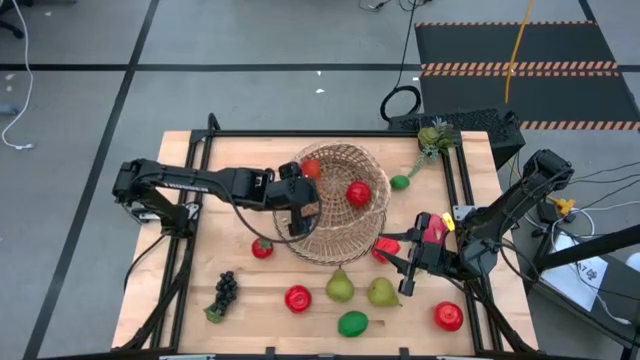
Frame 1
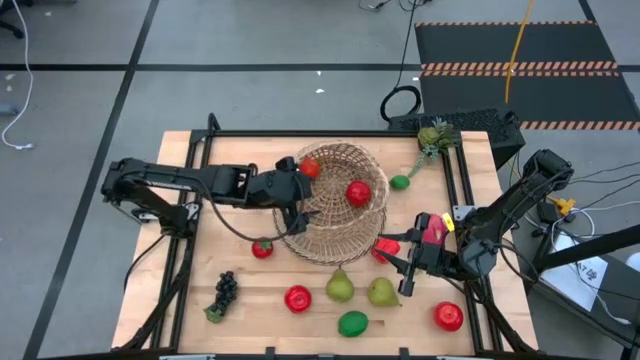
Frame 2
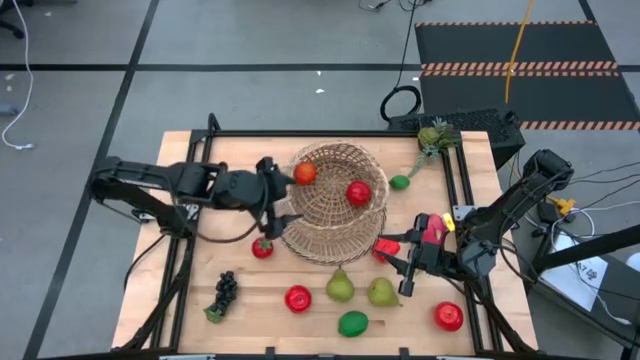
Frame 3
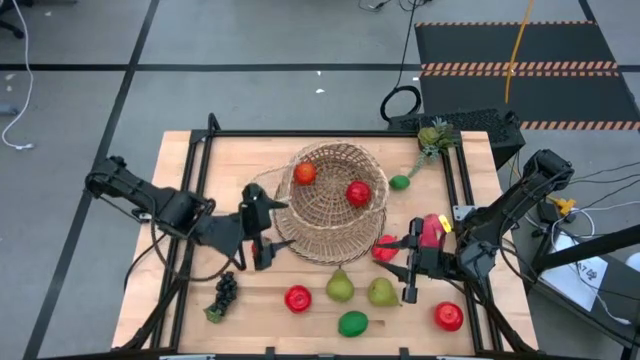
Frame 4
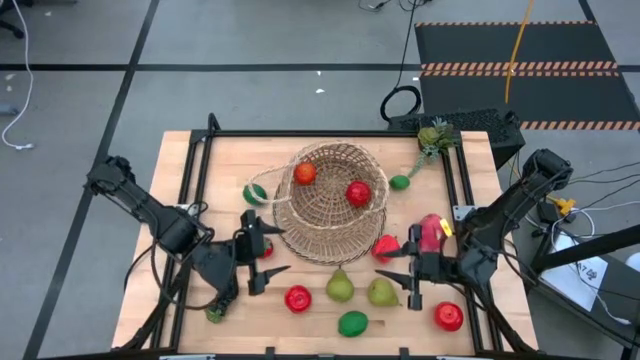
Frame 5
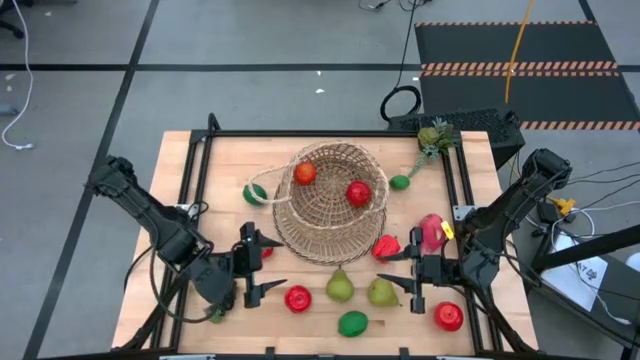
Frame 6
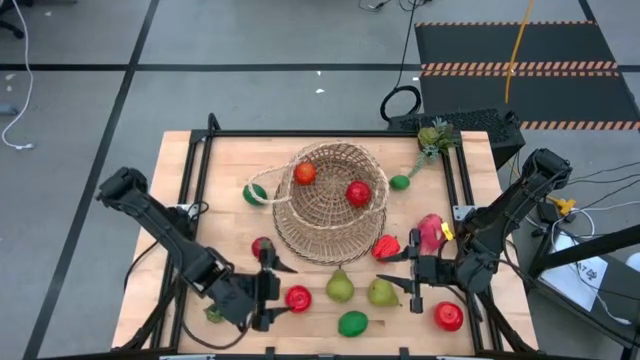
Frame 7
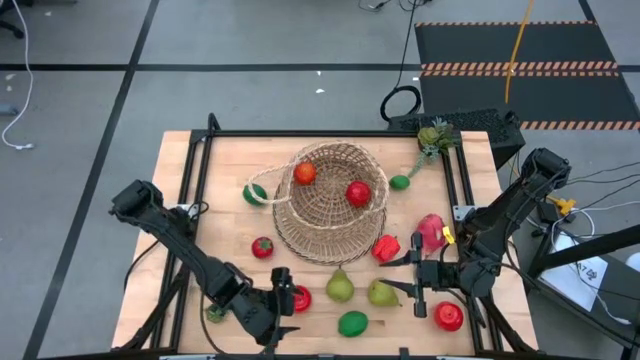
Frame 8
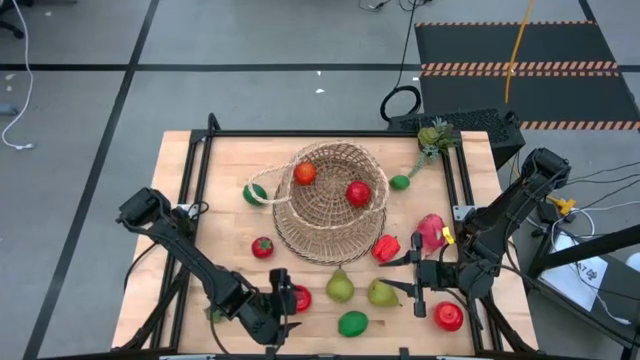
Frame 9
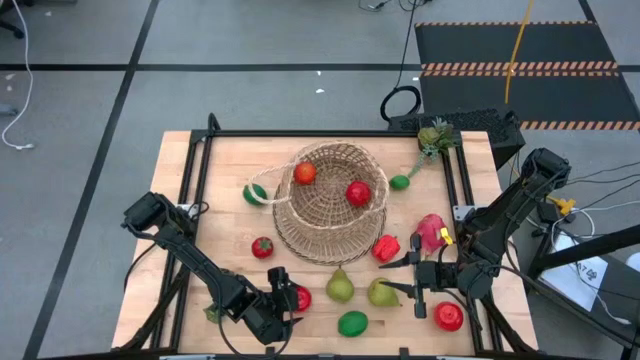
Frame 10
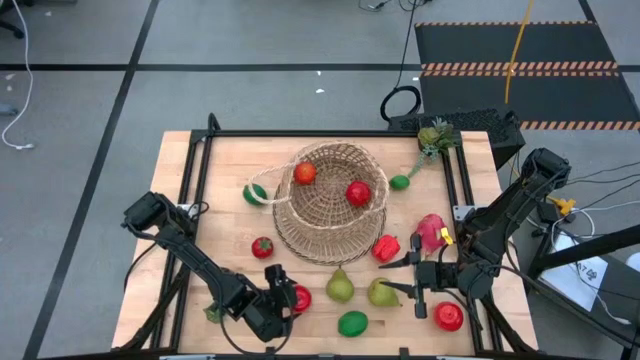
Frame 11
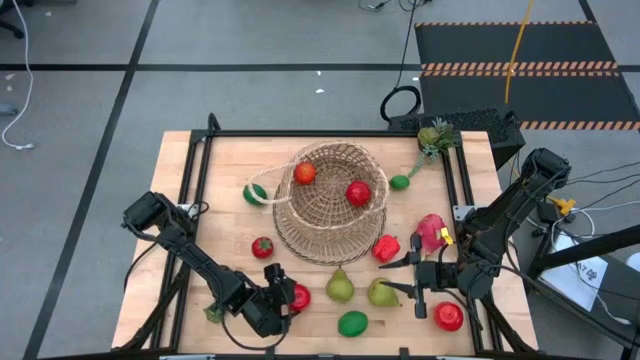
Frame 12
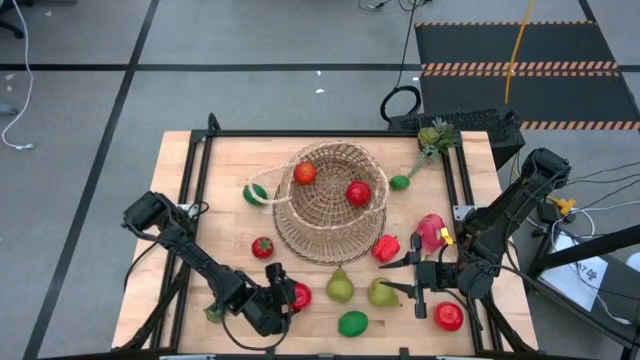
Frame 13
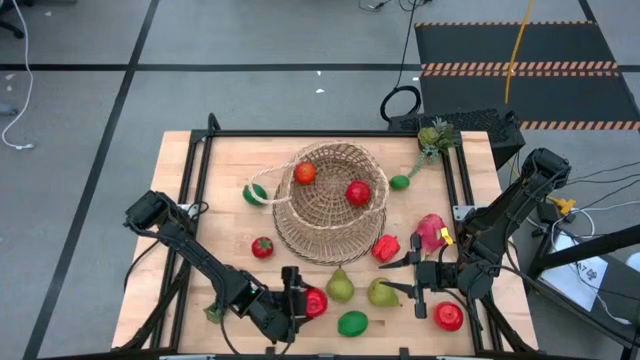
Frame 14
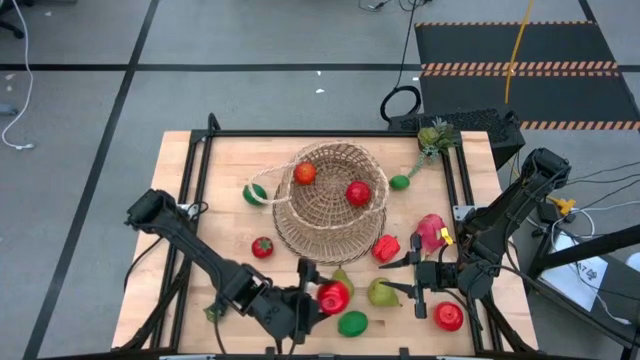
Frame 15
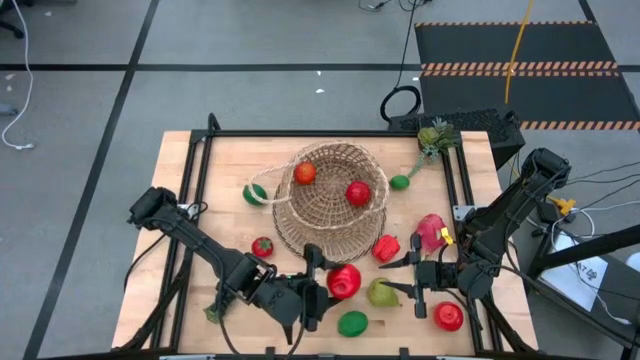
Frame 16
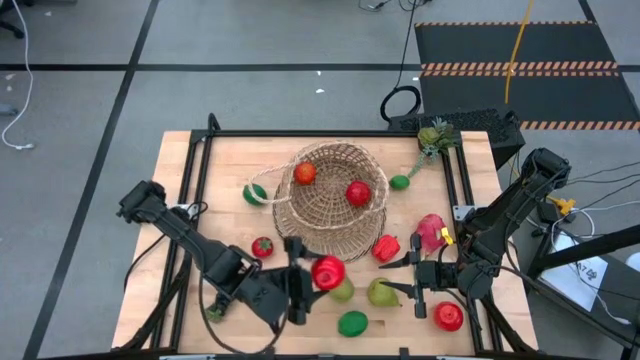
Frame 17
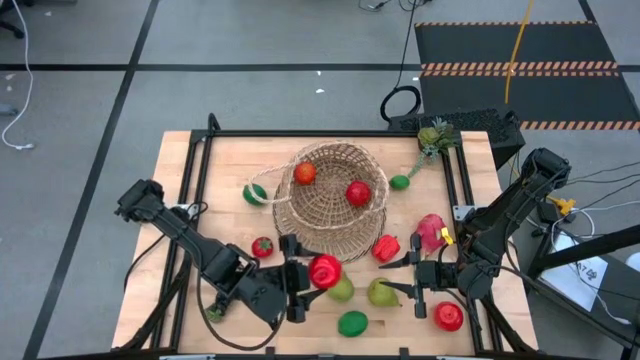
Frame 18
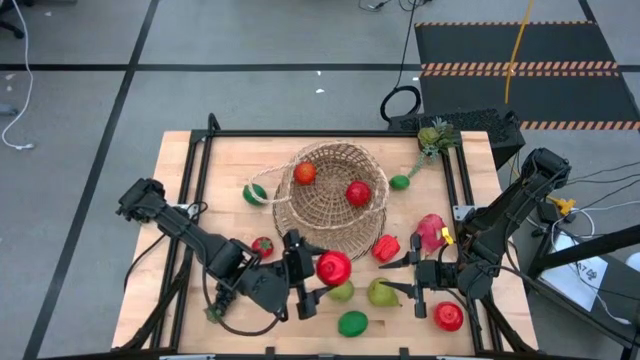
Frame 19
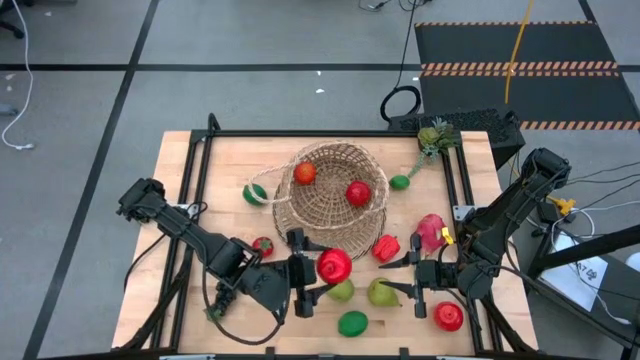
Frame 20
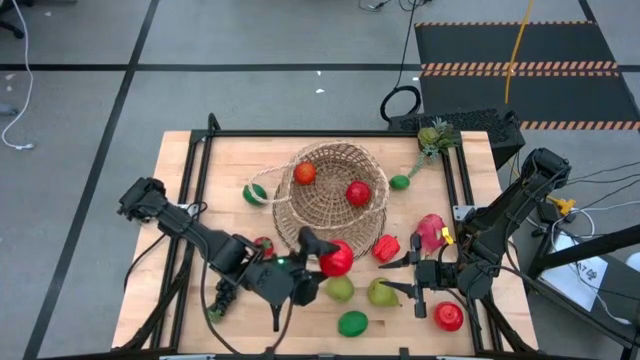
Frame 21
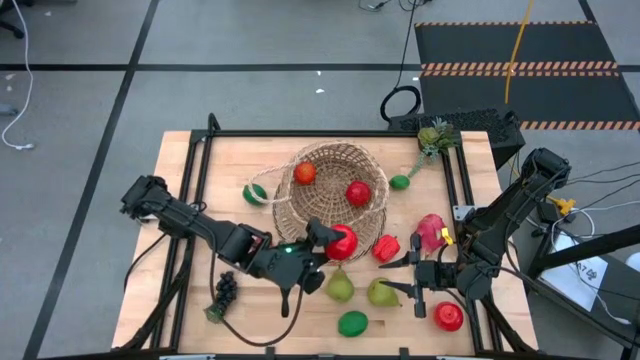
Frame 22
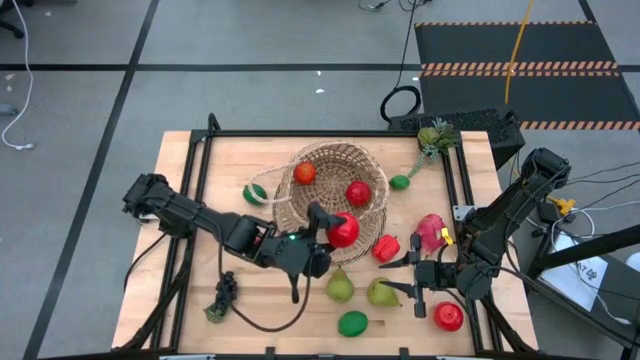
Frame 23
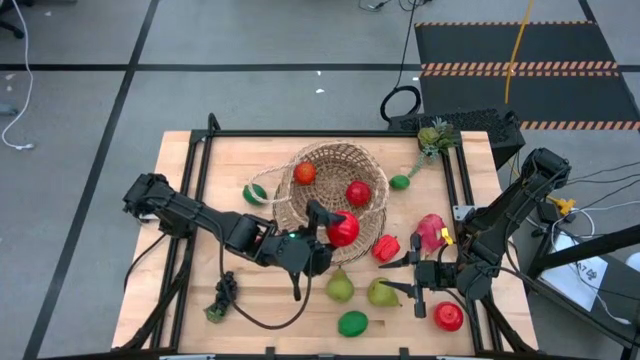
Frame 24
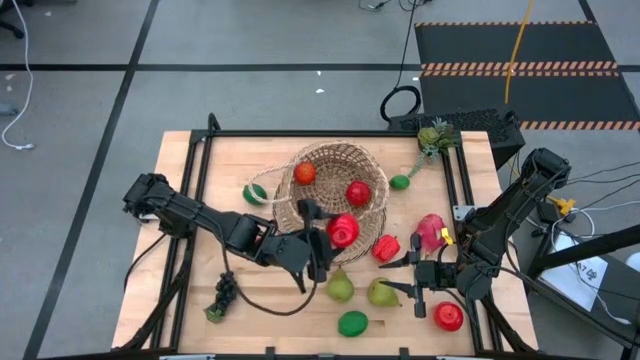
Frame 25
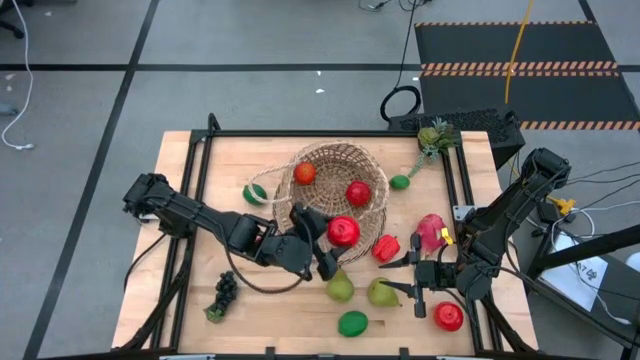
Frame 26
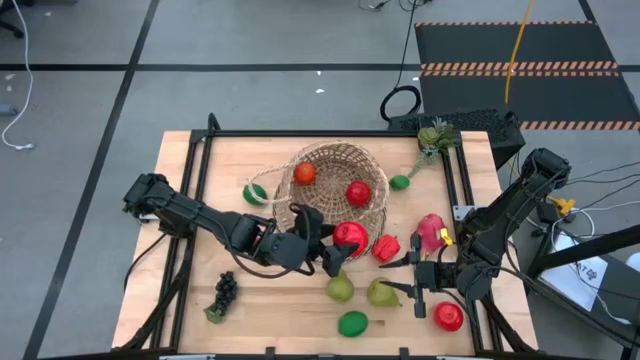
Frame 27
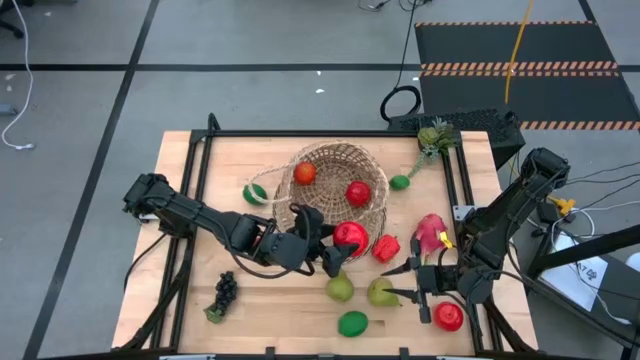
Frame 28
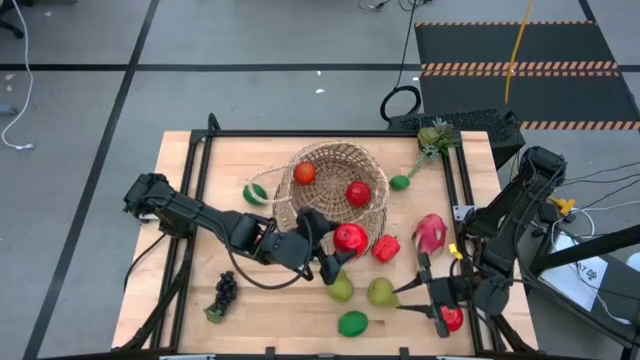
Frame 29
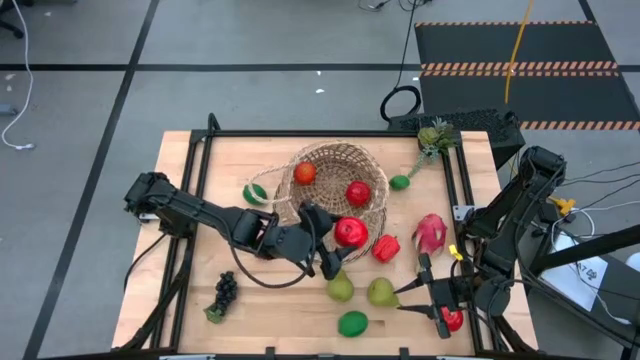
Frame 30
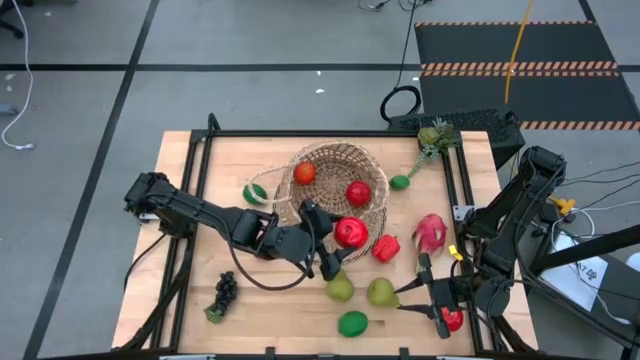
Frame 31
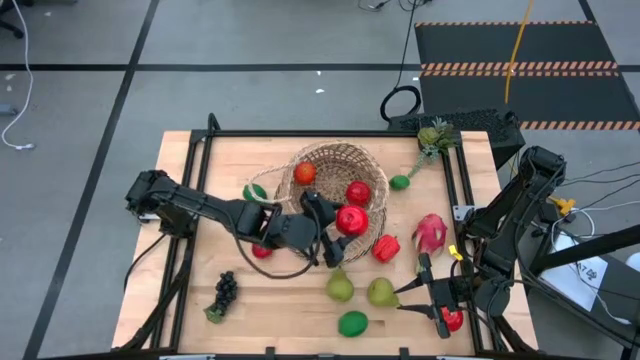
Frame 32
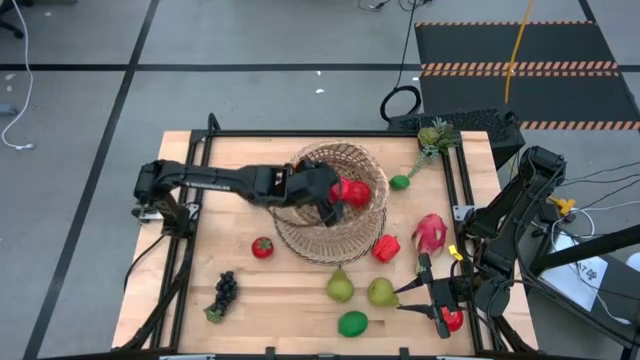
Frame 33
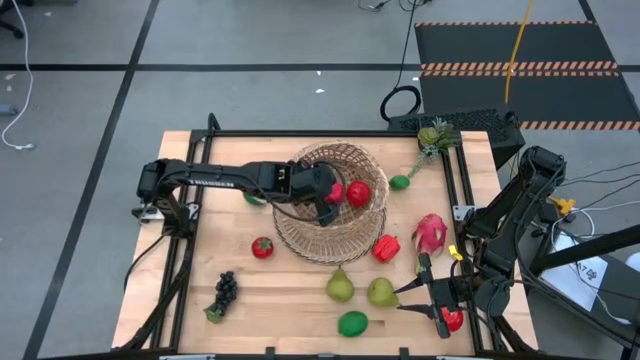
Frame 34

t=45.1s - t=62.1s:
Task: Build produce basket
Put the left red apple into the basket
